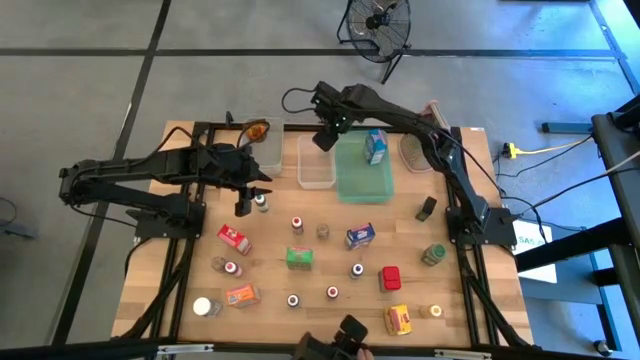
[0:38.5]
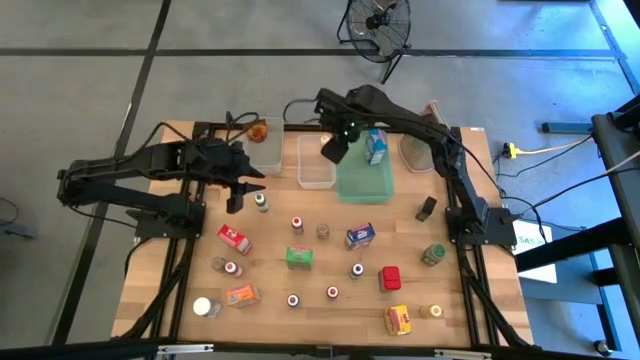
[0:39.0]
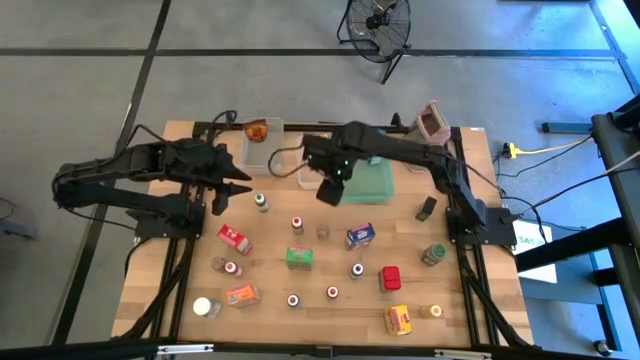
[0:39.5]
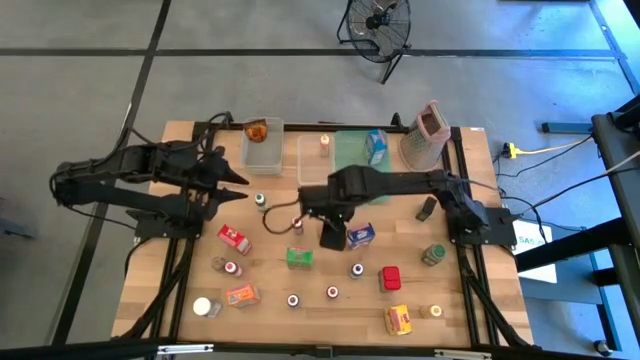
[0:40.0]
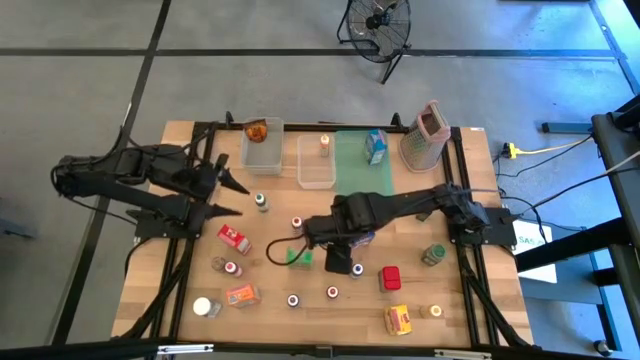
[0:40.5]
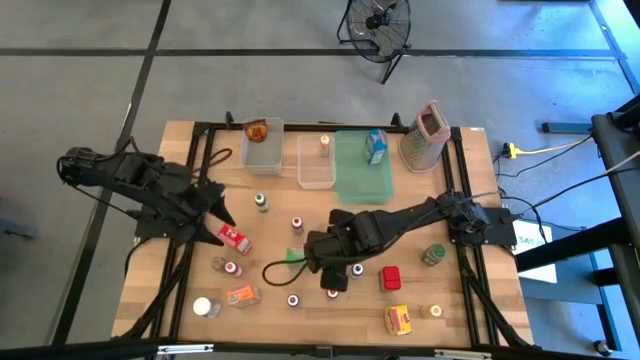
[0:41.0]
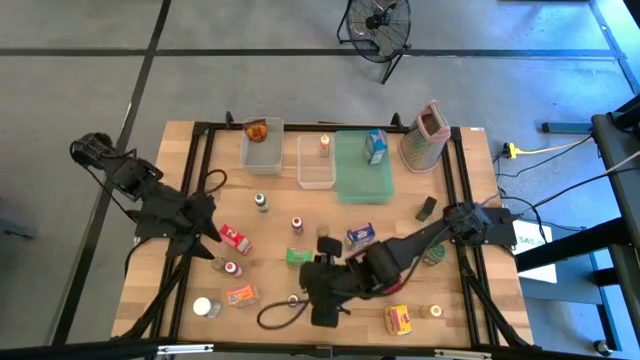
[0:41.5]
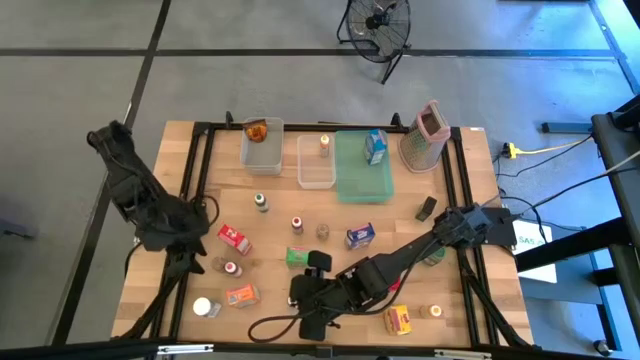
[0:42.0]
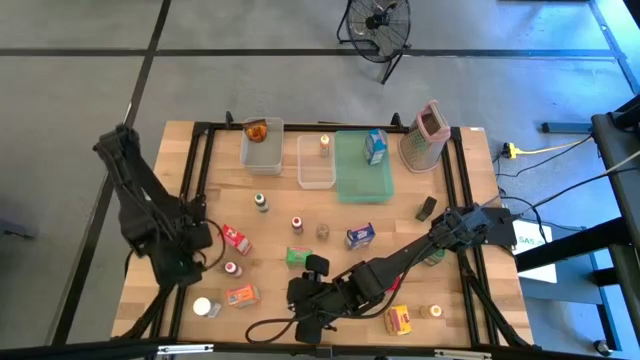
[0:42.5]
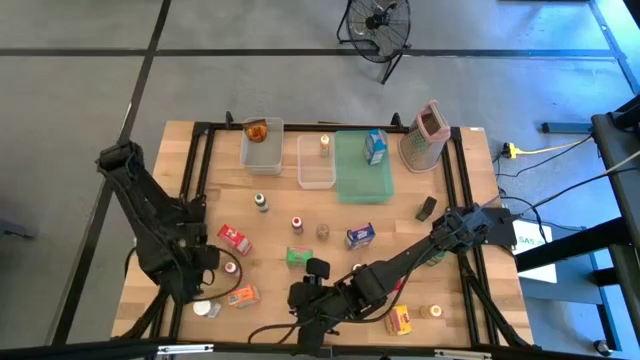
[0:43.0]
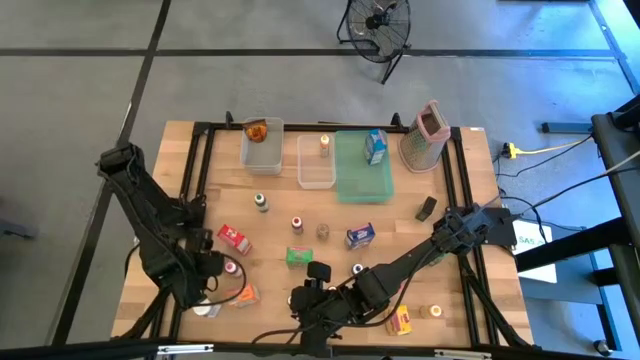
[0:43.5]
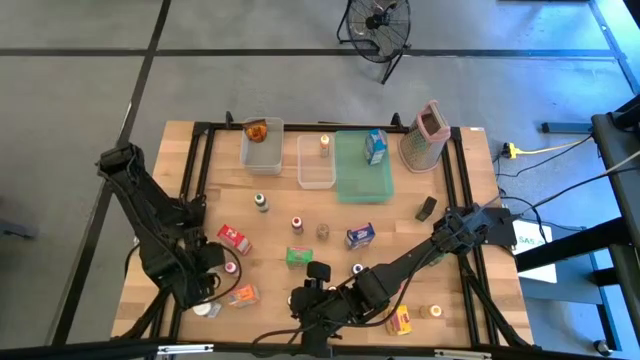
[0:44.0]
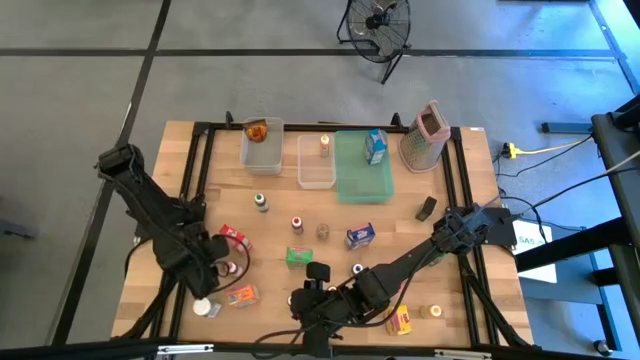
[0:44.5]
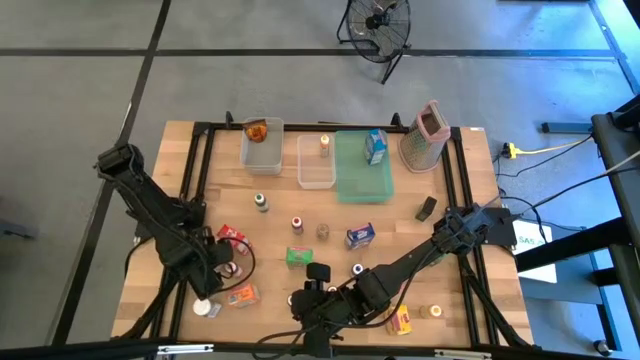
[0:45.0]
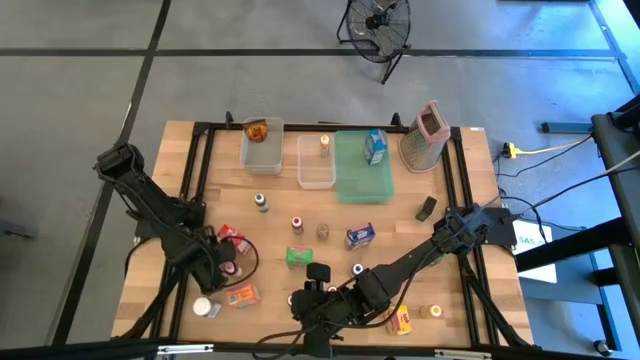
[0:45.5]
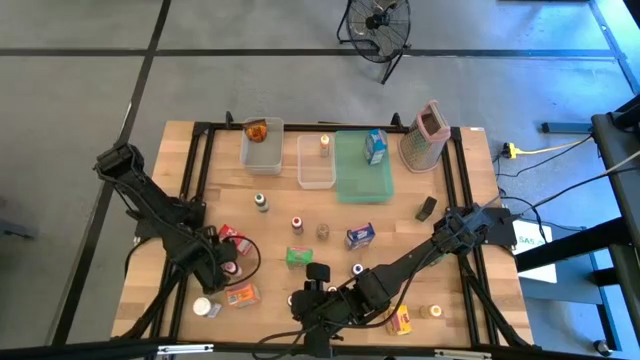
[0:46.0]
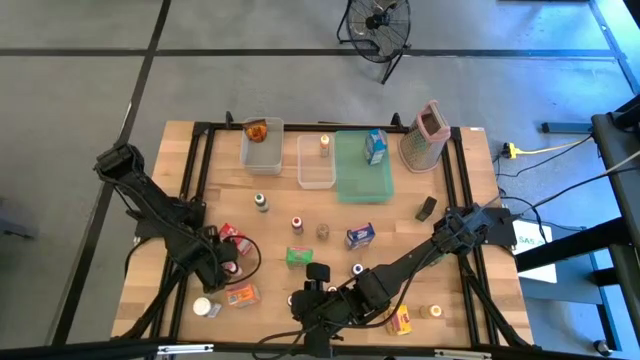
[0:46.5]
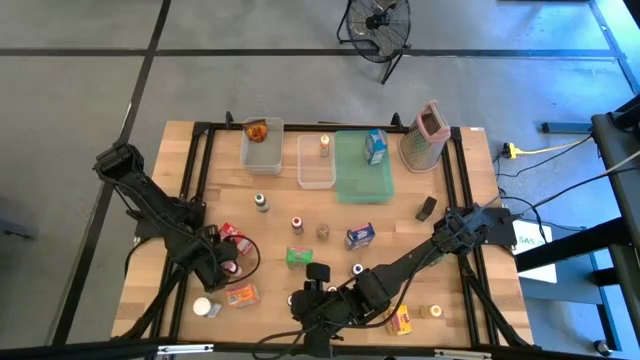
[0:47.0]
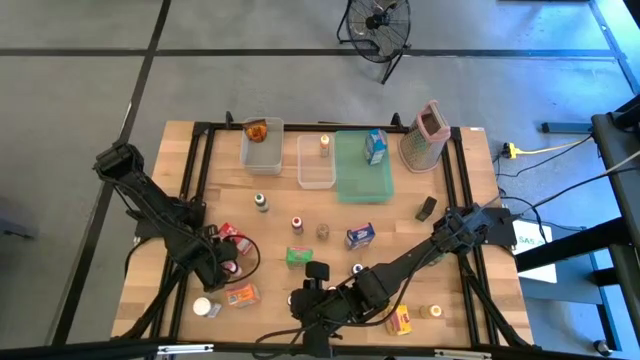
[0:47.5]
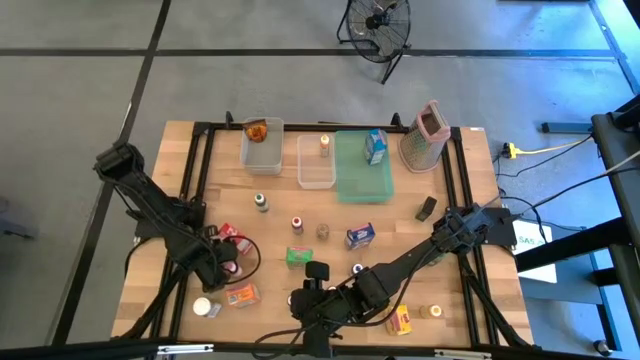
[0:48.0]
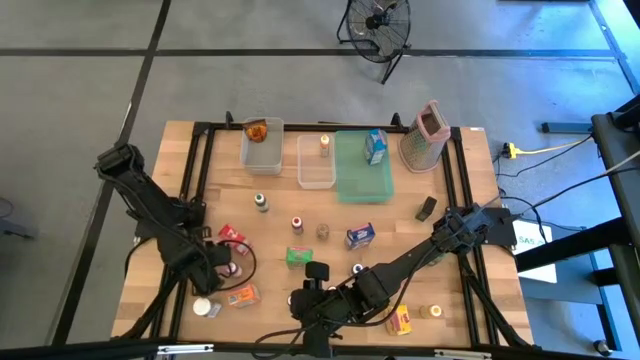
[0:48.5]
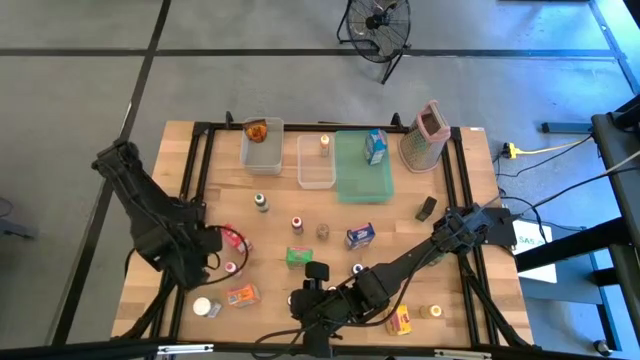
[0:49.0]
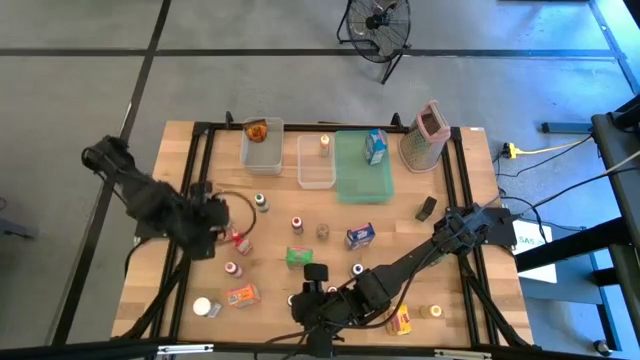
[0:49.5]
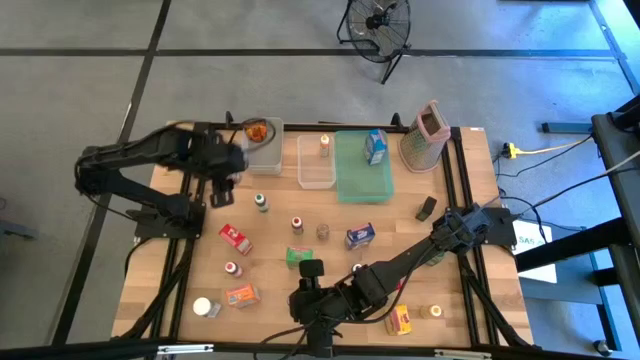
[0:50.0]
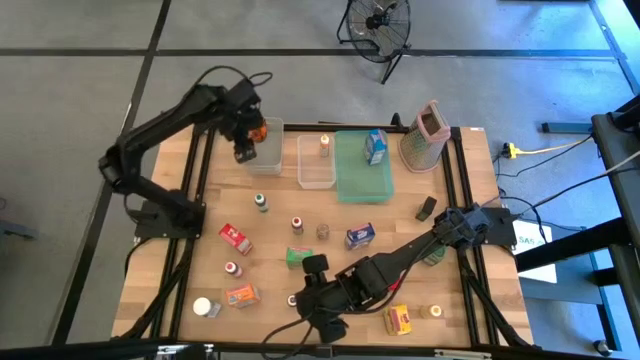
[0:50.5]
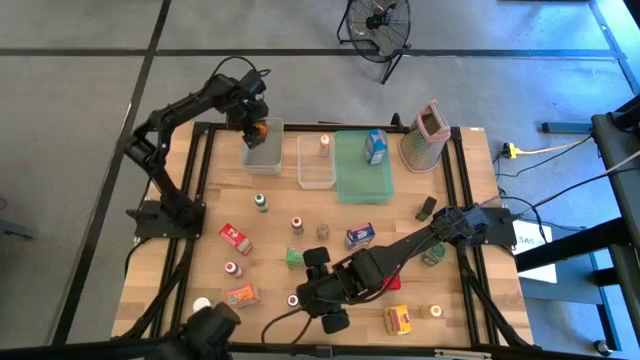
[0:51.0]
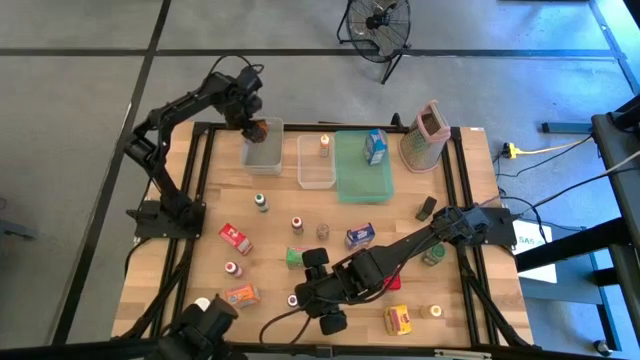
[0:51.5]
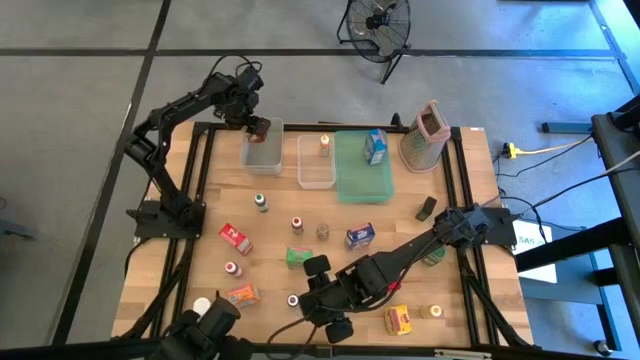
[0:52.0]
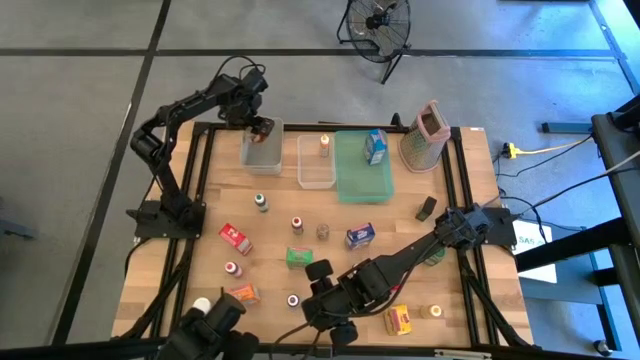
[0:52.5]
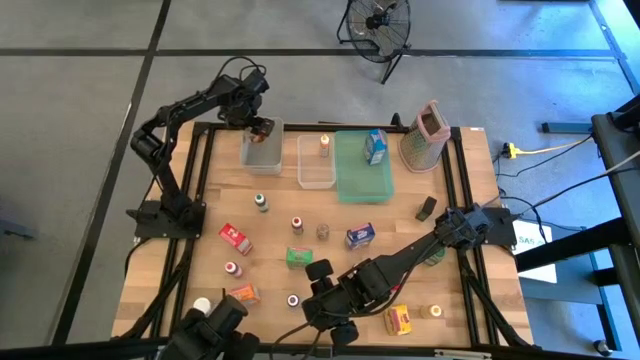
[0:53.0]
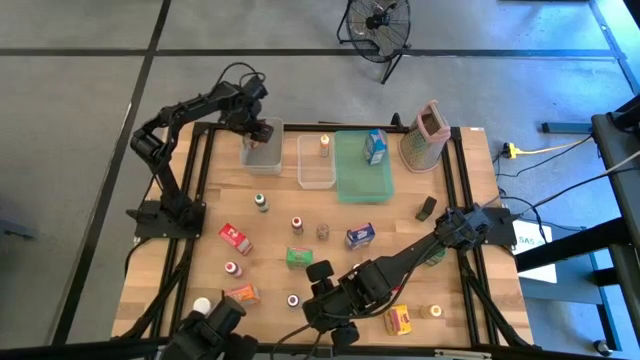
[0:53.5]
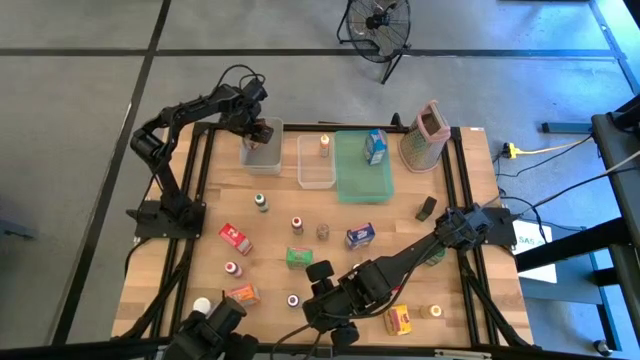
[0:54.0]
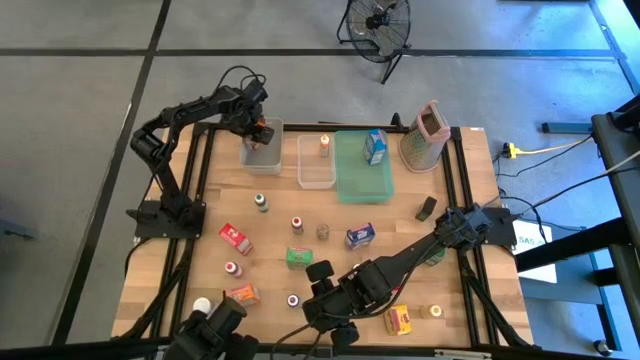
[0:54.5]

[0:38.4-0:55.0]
Task: Pick & Place Kitchen Items
Put the brown seasoning bottle into the gray bin

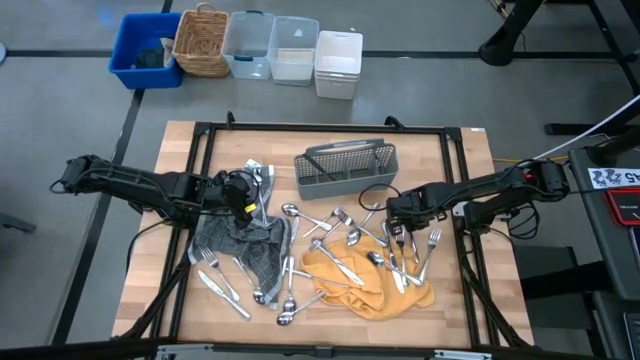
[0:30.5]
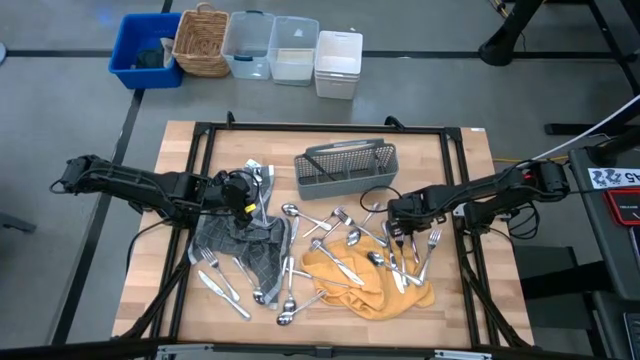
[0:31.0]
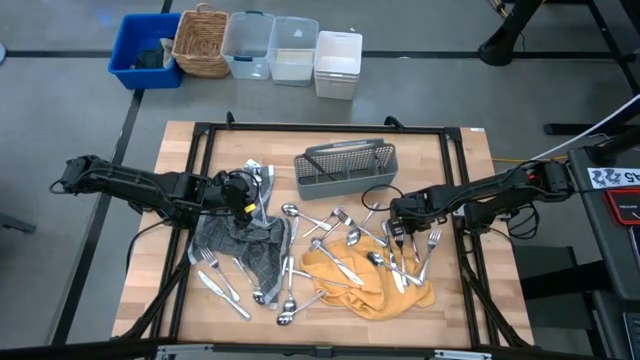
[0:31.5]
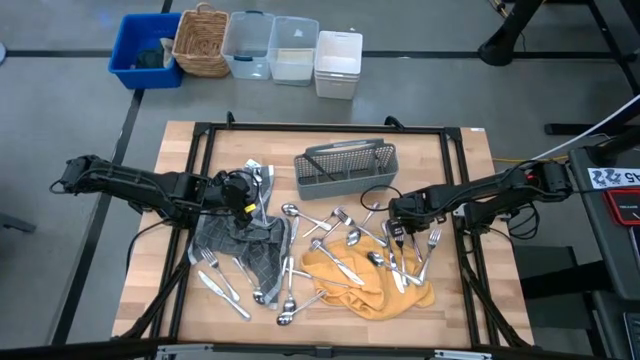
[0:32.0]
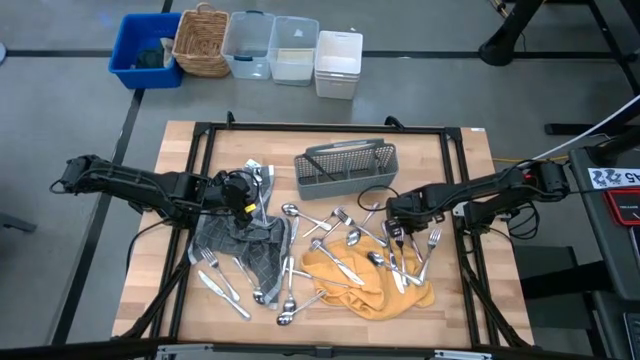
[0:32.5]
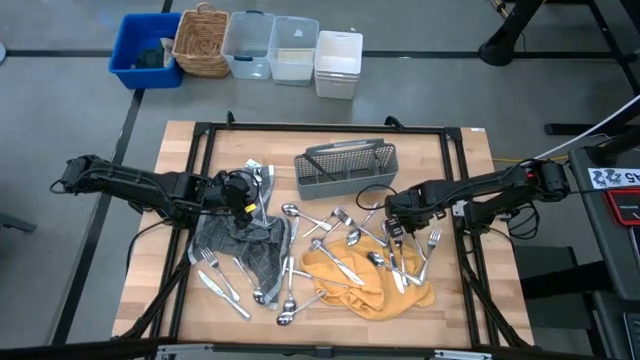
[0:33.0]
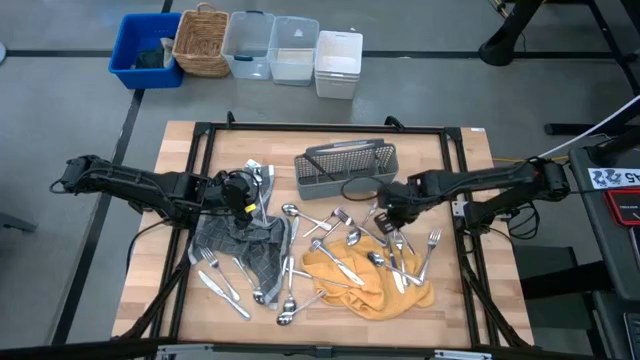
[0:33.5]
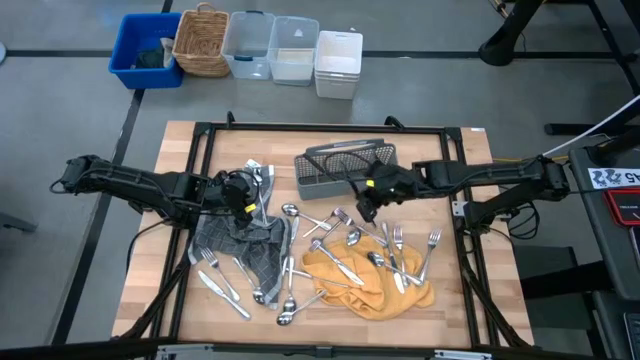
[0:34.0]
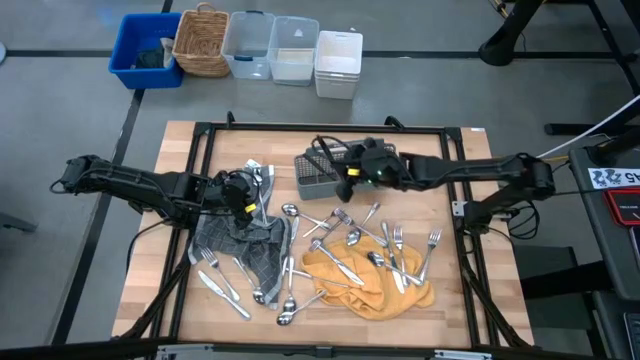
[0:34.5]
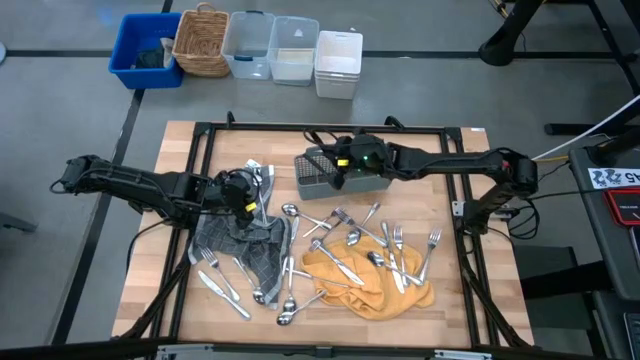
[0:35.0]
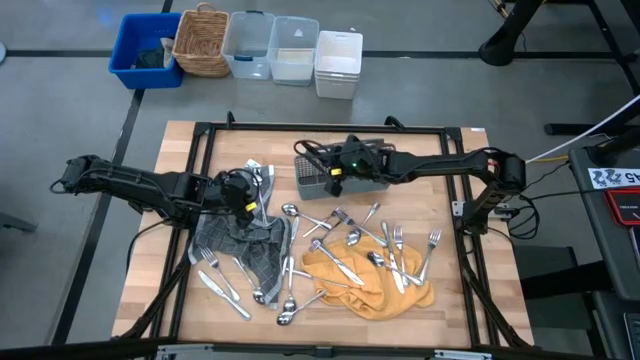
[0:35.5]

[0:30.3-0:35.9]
Task: Sort silverware
Put the silver knife into the gray utensil holder
